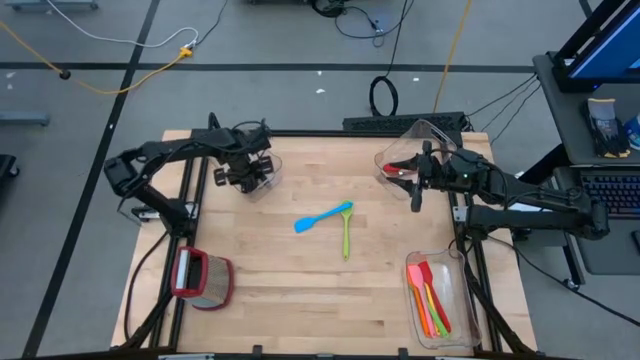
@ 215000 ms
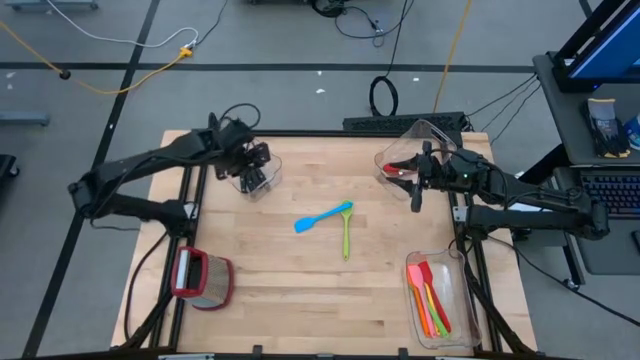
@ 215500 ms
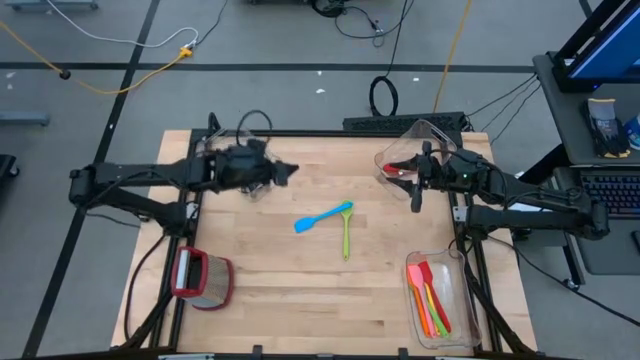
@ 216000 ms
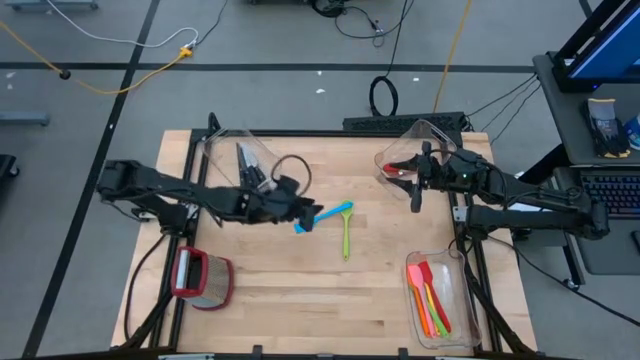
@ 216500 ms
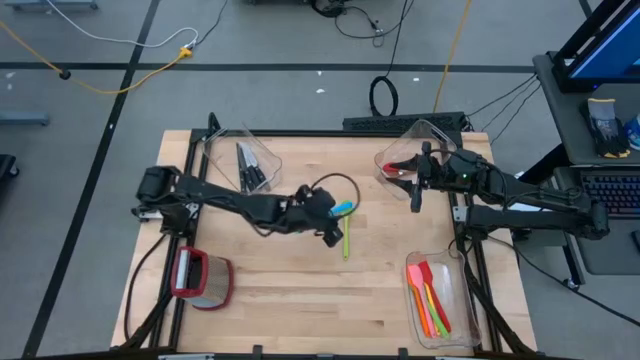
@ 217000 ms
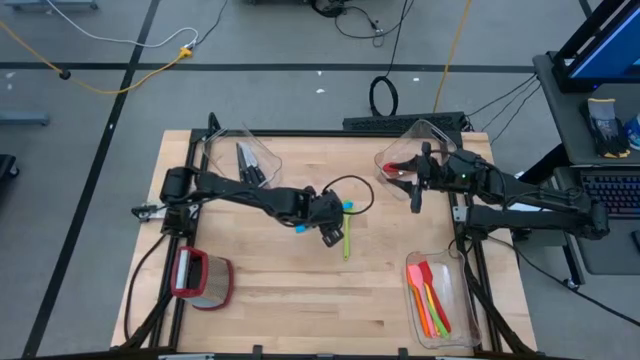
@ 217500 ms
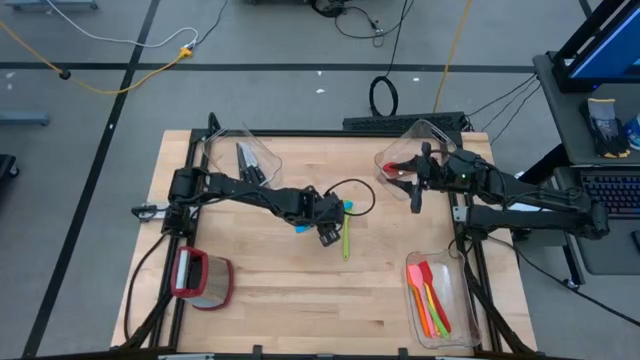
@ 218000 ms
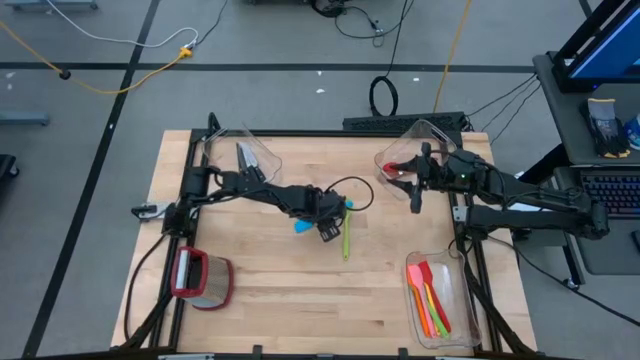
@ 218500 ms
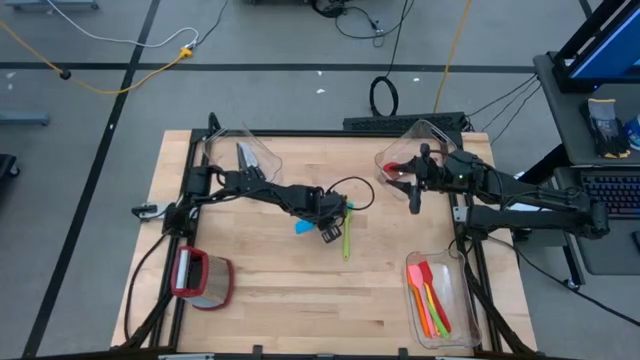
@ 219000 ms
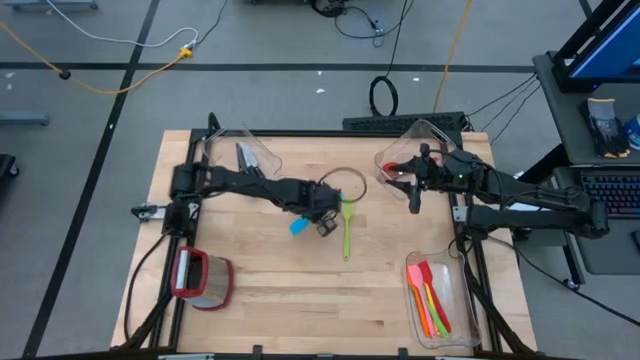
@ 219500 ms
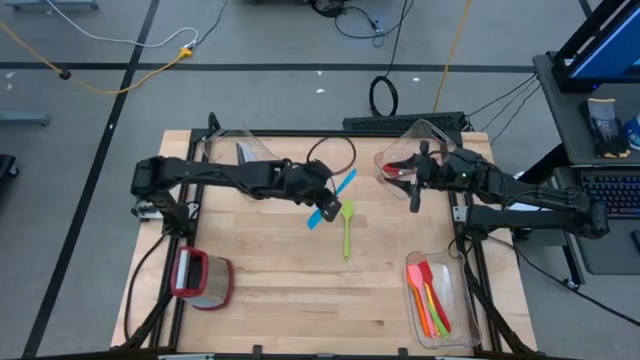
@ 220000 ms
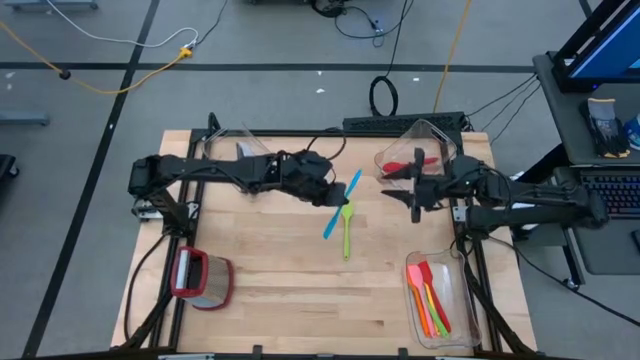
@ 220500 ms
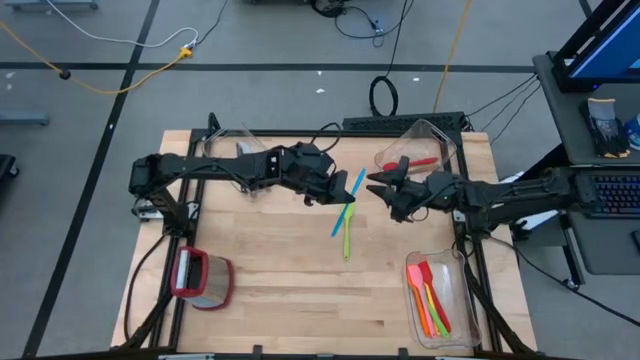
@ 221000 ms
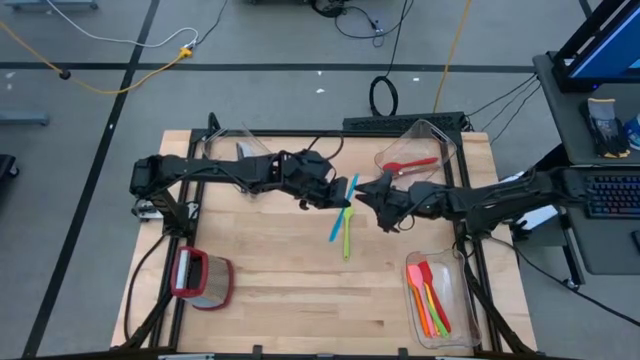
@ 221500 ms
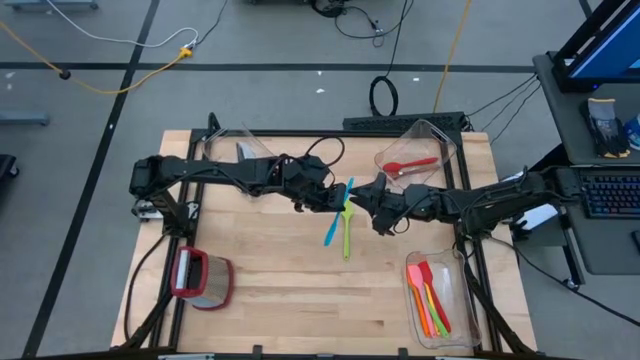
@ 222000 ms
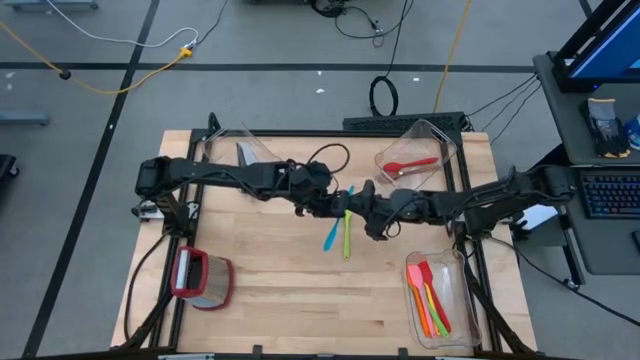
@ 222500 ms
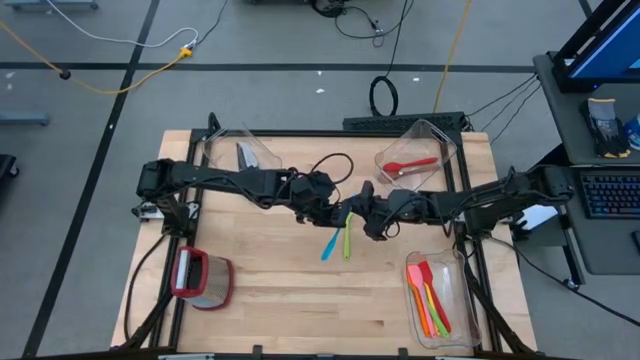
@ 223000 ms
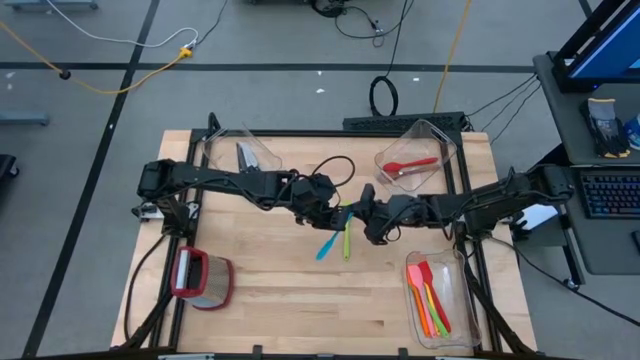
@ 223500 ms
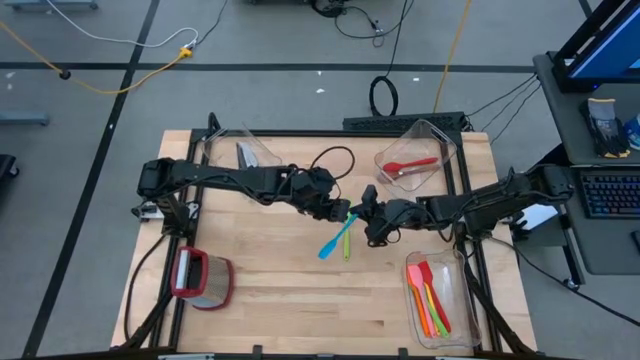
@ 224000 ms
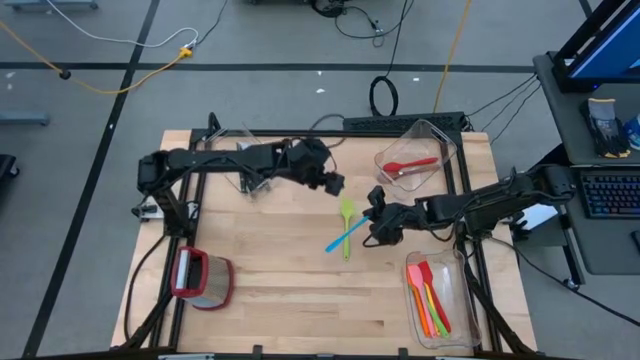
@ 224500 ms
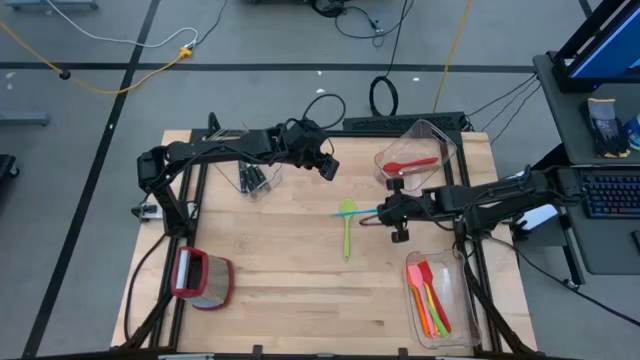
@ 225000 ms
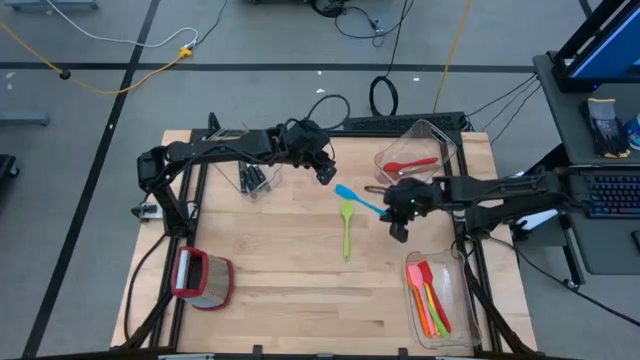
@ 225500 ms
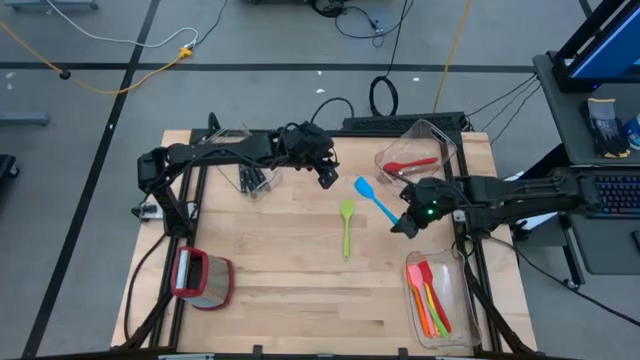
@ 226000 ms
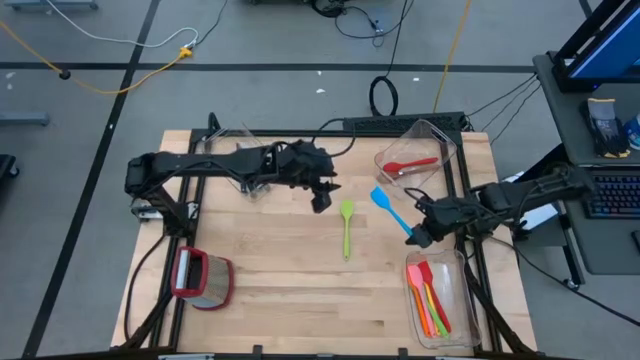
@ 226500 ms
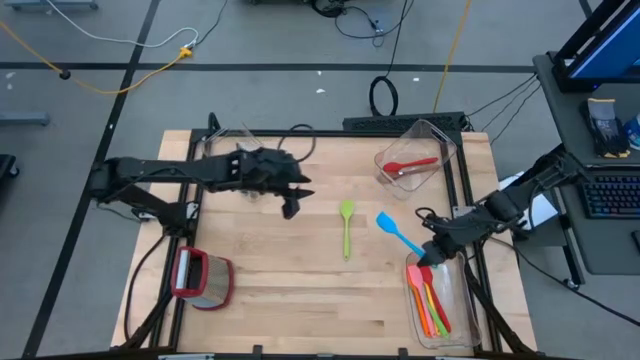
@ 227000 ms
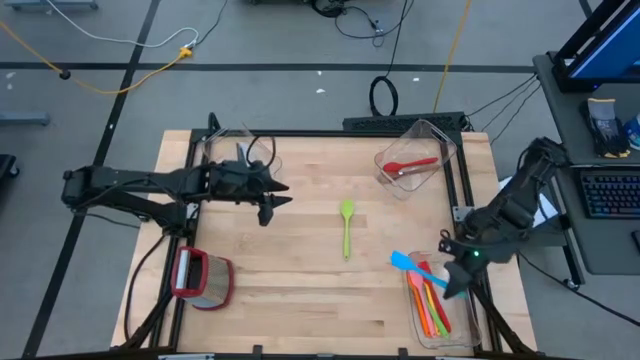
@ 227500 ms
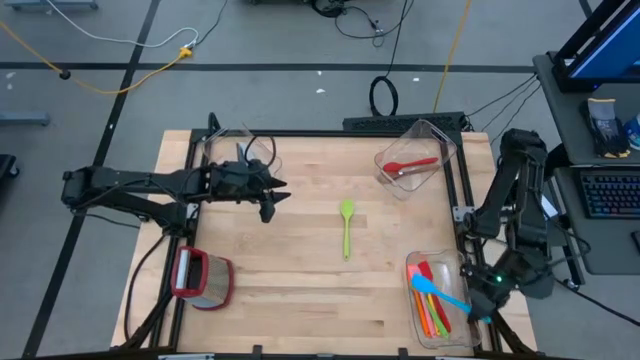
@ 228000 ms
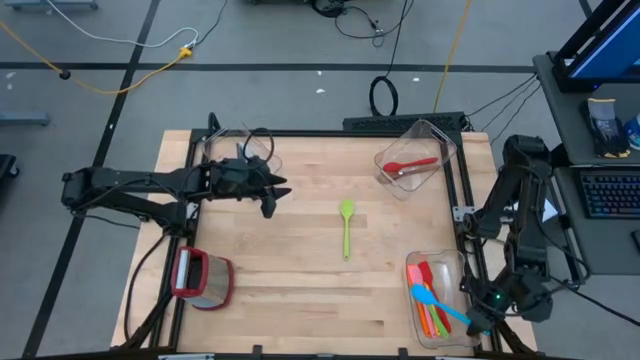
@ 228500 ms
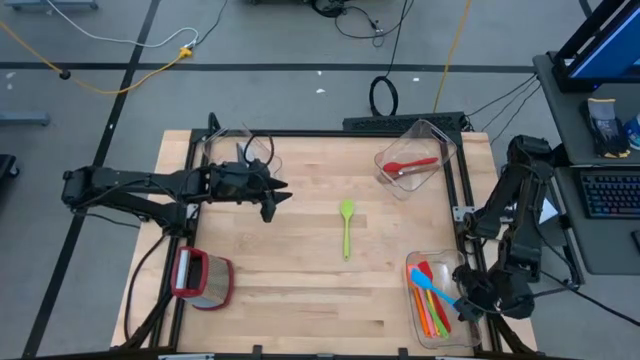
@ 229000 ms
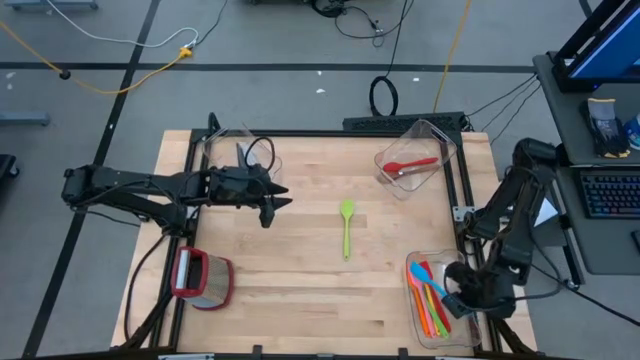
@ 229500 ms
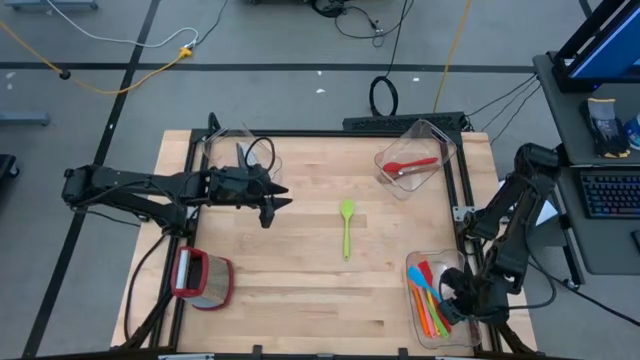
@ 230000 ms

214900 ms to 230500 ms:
Task: Pick & Place Kitchen Items
Put the blue spatula into the bottom transparent bin

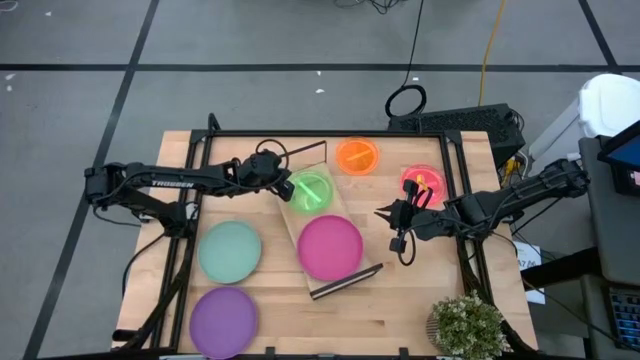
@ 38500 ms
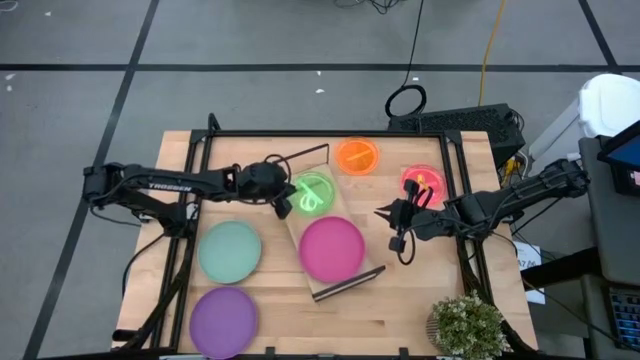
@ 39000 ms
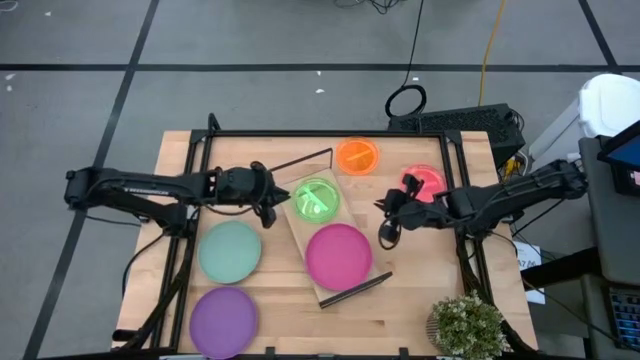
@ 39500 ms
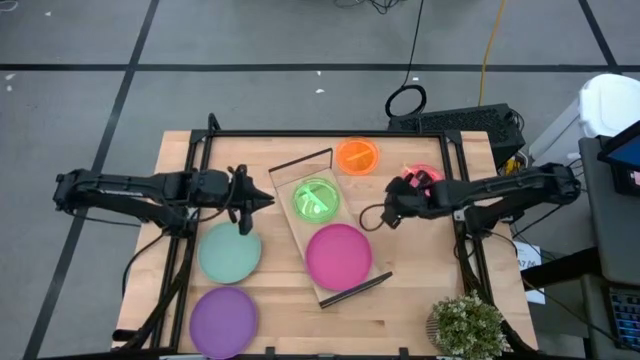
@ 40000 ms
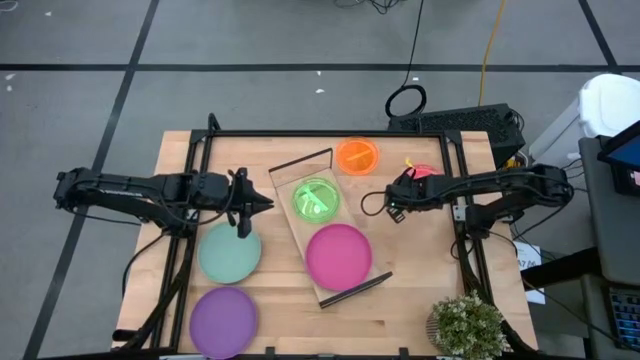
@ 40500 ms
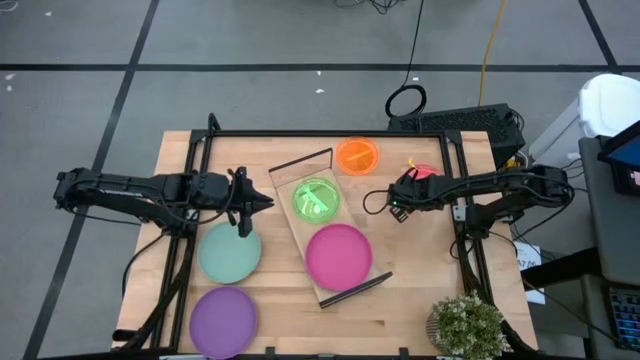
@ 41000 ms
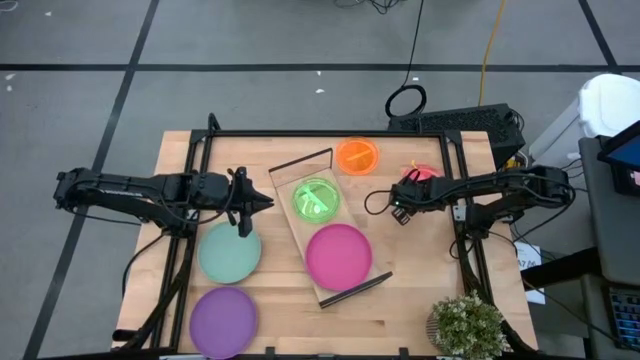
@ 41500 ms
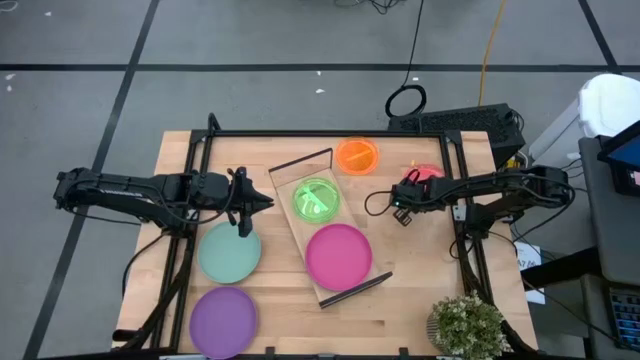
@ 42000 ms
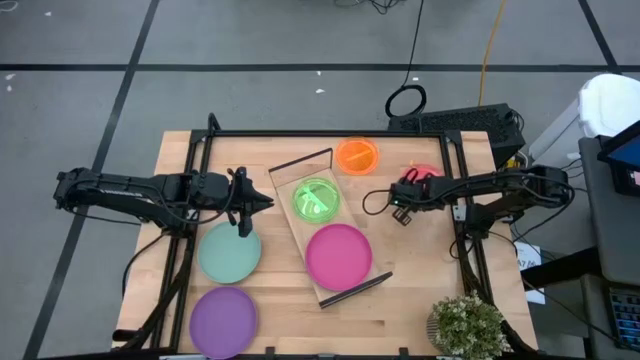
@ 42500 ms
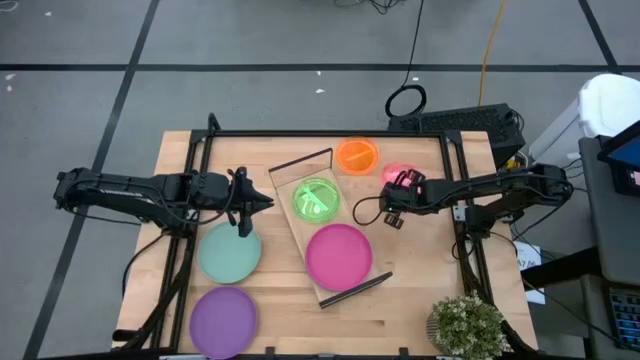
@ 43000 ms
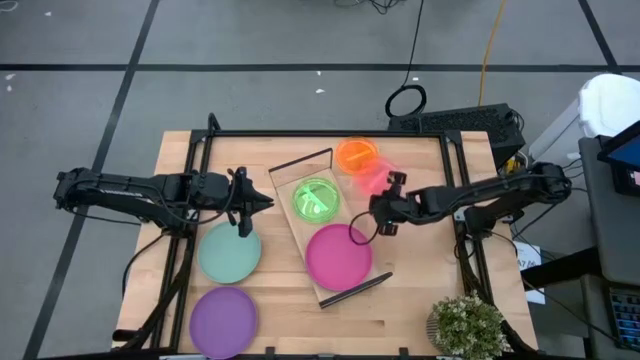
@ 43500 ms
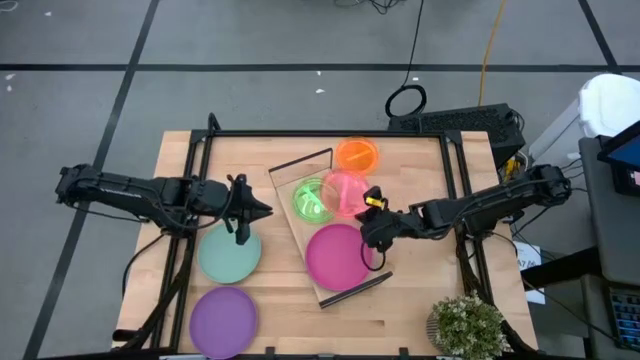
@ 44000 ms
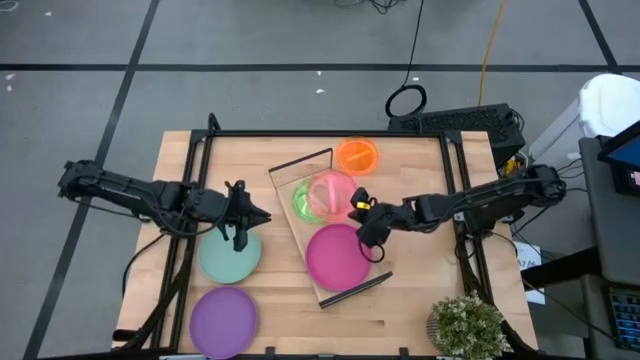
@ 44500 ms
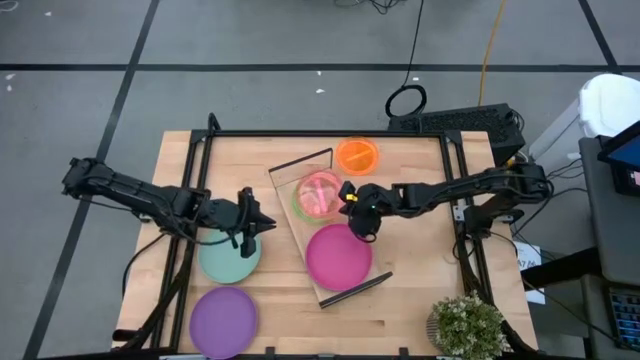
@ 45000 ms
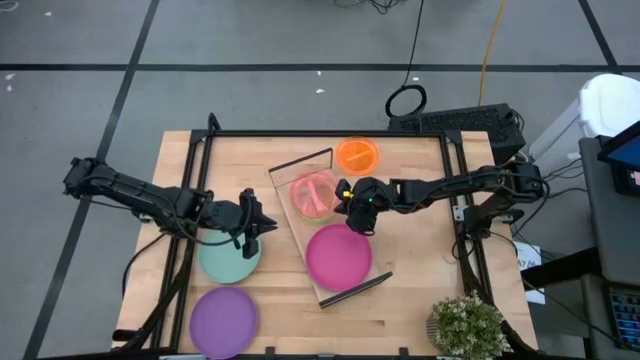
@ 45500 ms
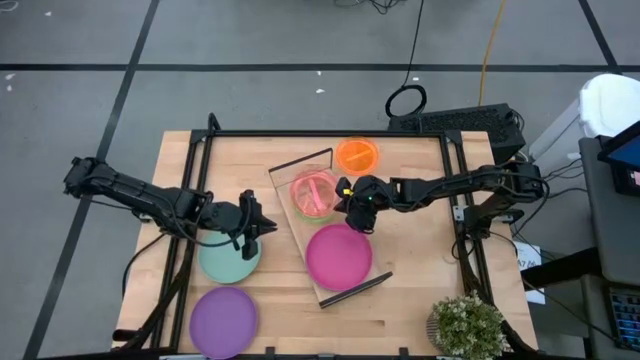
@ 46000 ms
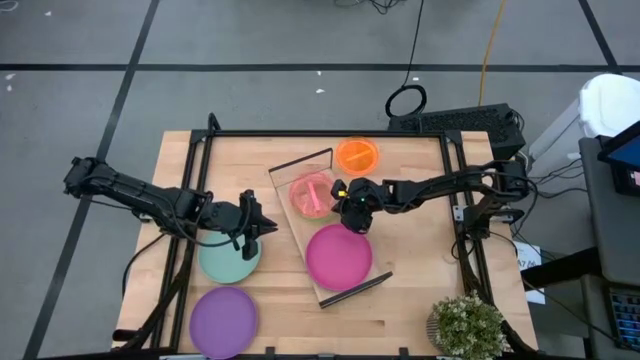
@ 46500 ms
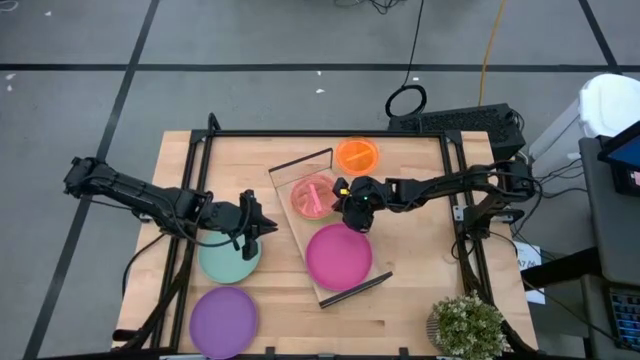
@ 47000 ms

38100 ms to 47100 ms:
Task: Place and stack plates onto a shelf
Stack the light pink plate on the yellow green plate on the shelf
